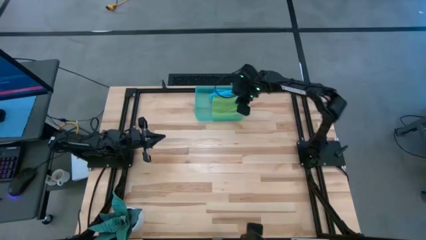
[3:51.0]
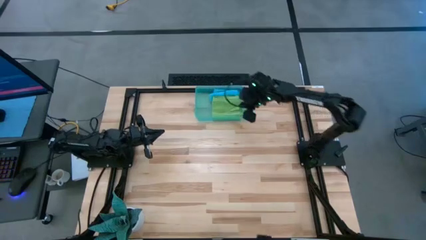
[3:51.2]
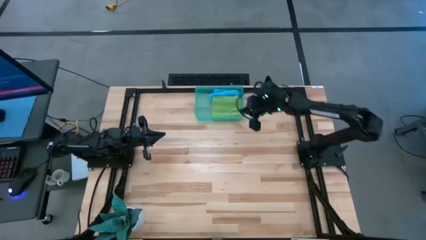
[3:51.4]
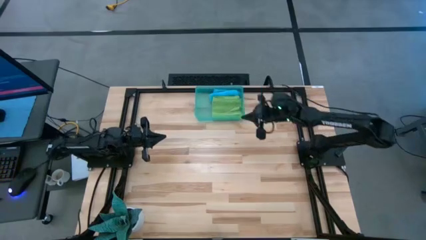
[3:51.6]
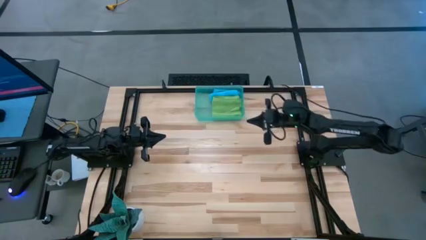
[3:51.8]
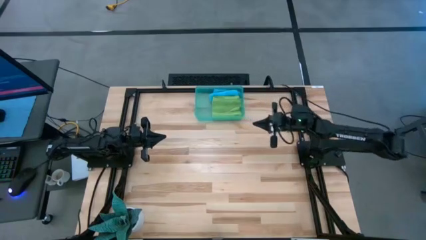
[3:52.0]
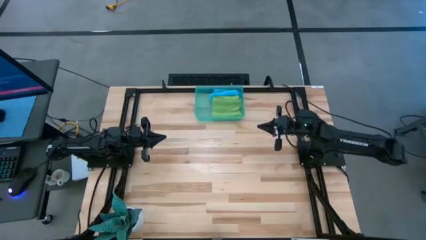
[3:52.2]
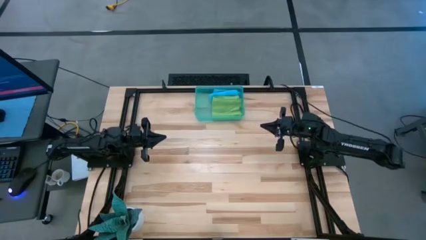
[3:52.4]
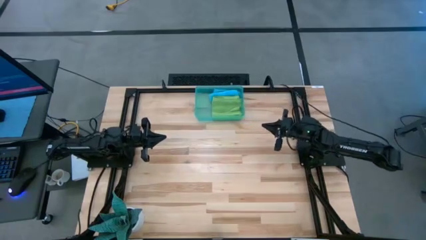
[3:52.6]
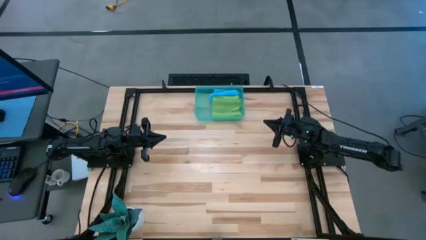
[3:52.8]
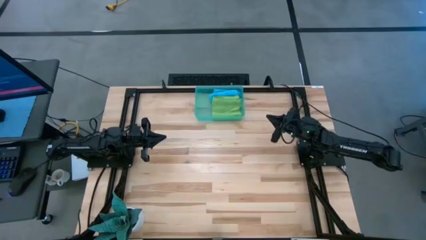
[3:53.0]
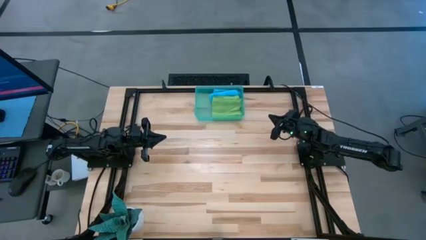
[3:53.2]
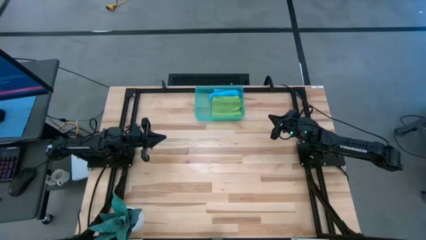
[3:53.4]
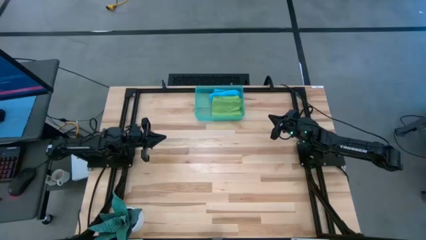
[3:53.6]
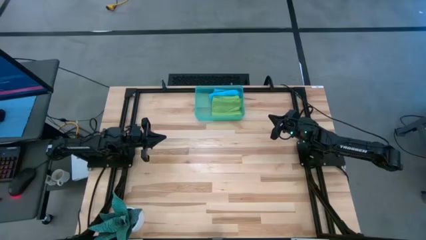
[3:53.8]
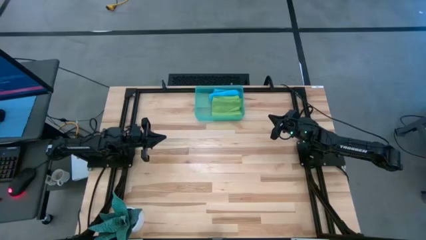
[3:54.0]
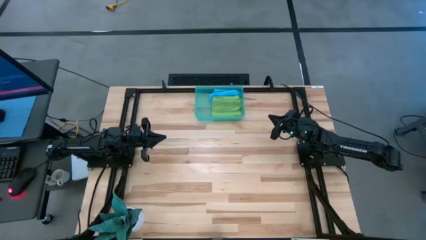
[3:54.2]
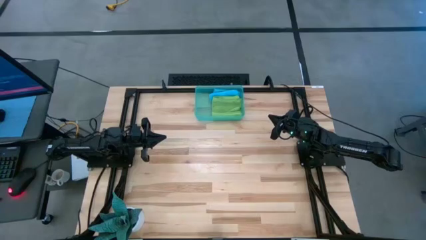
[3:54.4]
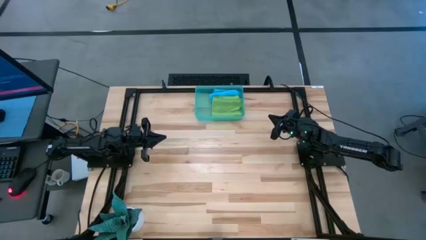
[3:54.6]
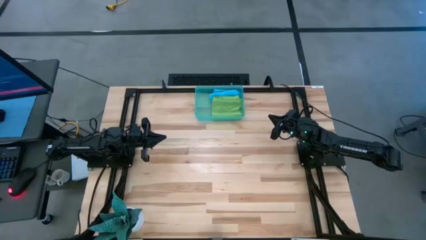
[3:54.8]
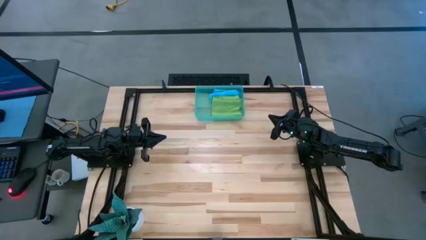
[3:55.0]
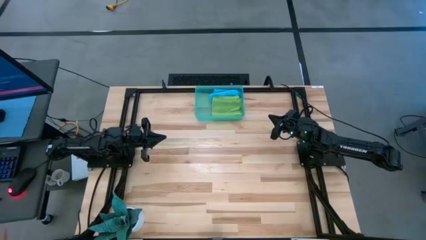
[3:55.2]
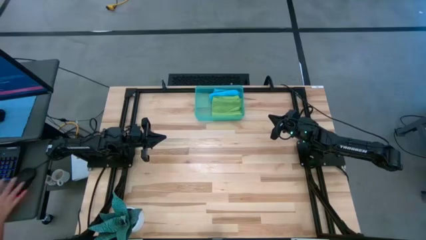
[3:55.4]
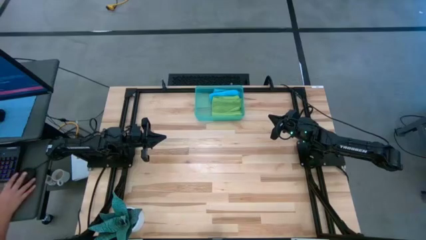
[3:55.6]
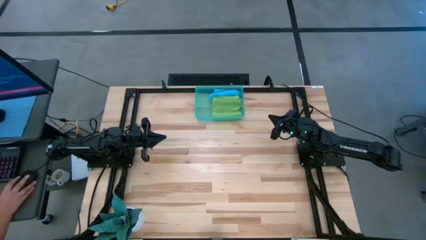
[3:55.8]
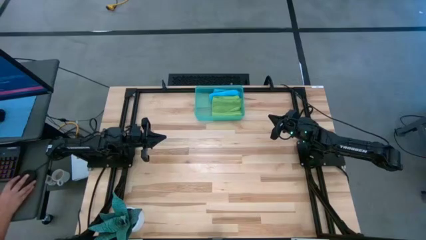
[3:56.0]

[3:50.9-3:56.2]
Task: Roll microfiber towels into tight, uniform cylinder then place into a basket
Return to Home Position

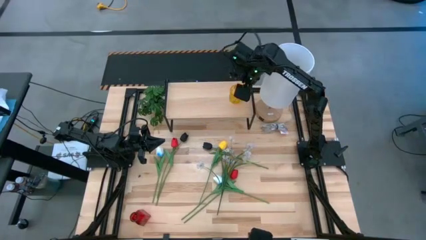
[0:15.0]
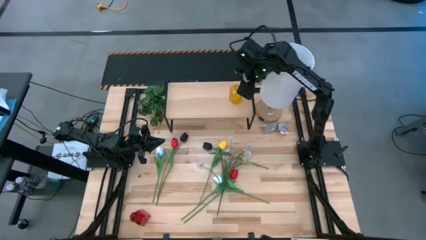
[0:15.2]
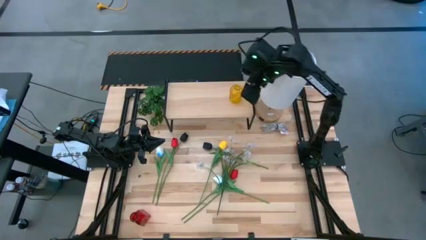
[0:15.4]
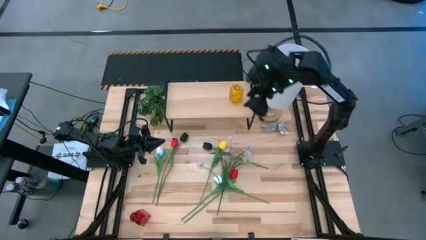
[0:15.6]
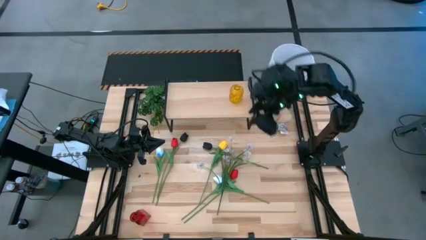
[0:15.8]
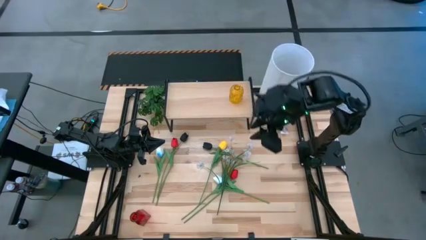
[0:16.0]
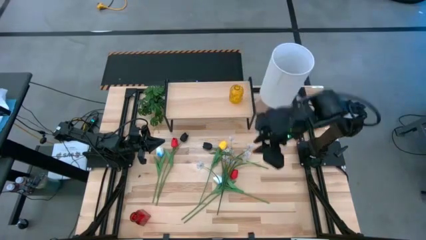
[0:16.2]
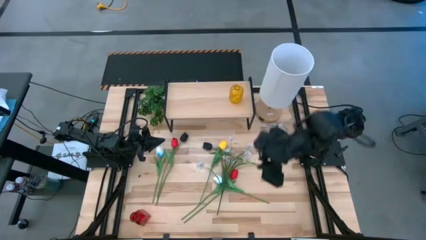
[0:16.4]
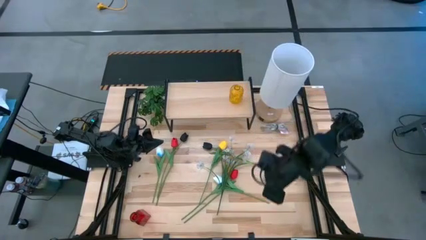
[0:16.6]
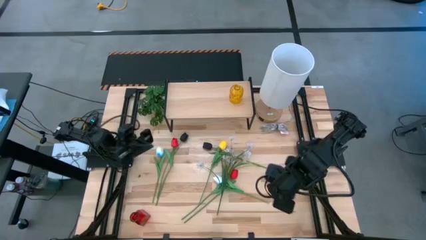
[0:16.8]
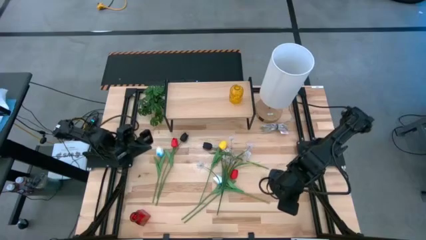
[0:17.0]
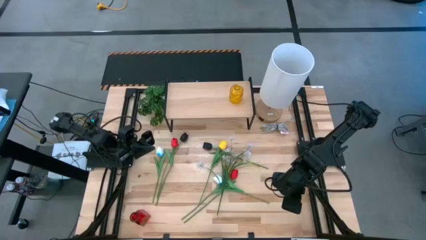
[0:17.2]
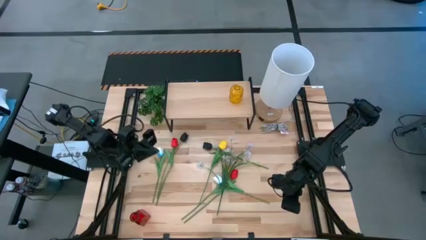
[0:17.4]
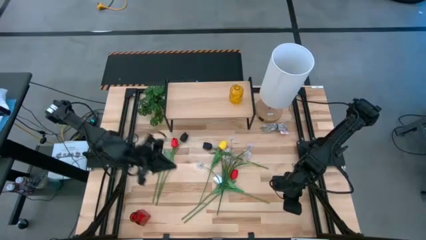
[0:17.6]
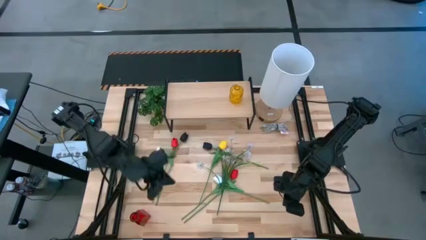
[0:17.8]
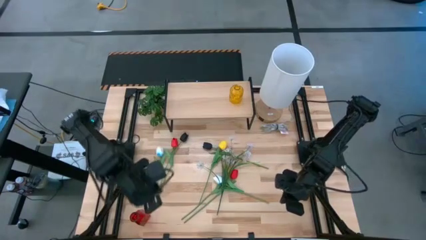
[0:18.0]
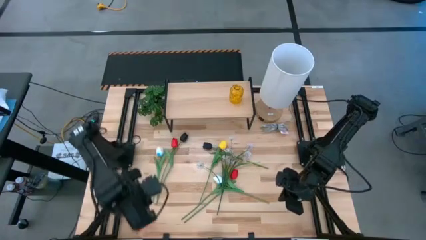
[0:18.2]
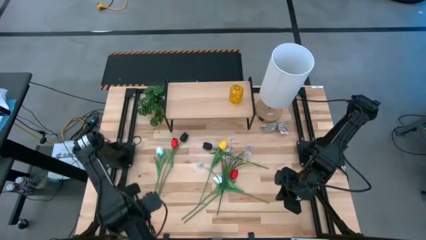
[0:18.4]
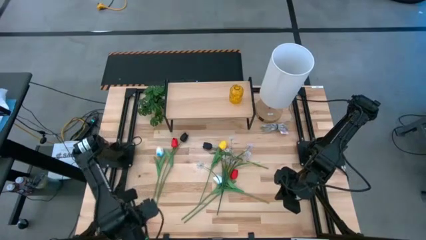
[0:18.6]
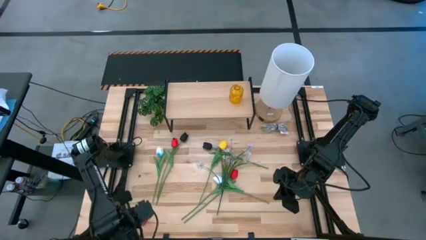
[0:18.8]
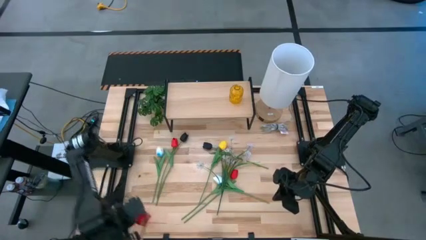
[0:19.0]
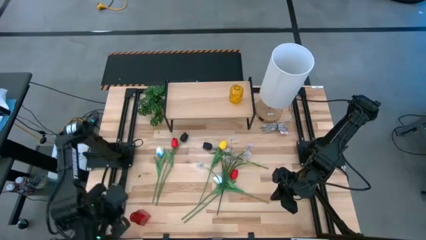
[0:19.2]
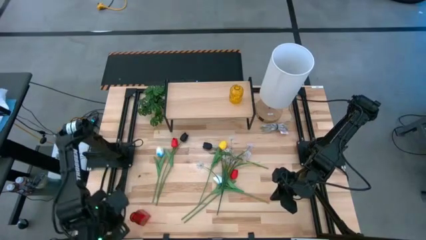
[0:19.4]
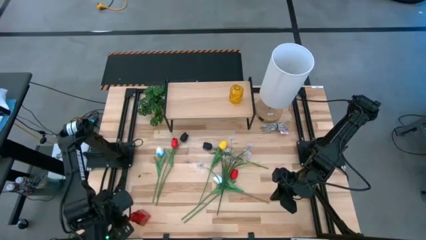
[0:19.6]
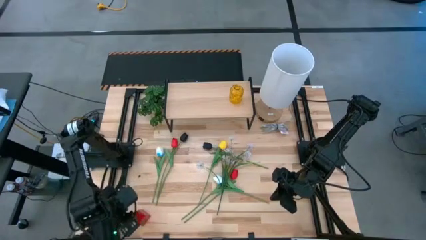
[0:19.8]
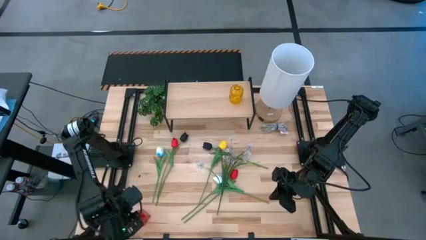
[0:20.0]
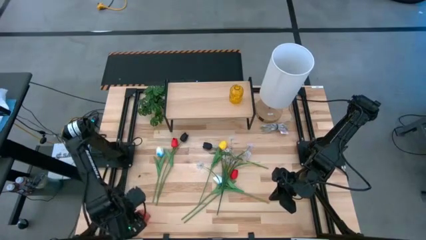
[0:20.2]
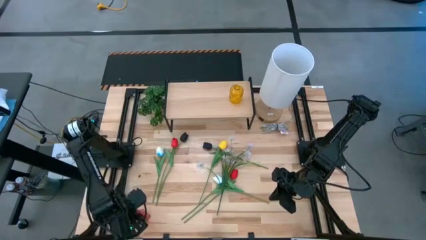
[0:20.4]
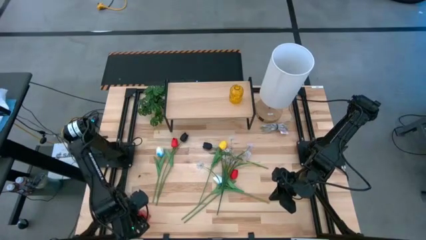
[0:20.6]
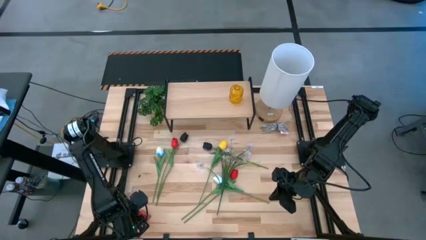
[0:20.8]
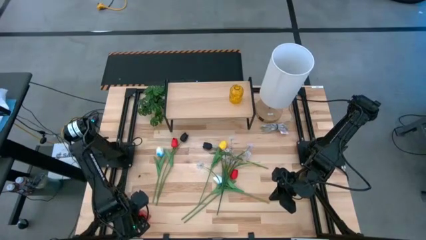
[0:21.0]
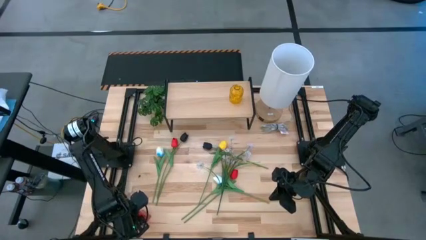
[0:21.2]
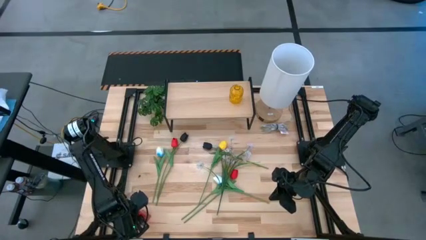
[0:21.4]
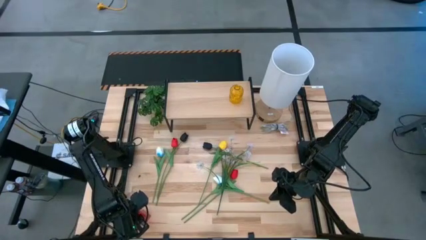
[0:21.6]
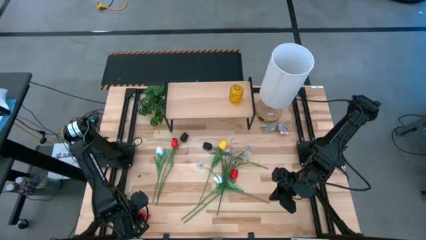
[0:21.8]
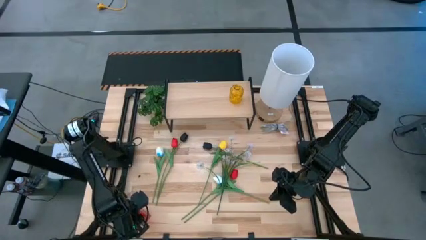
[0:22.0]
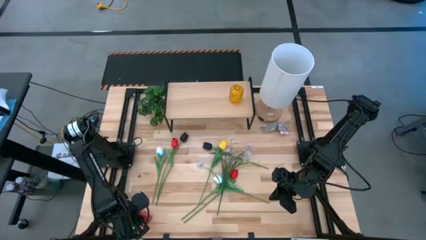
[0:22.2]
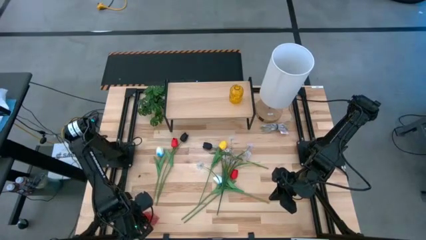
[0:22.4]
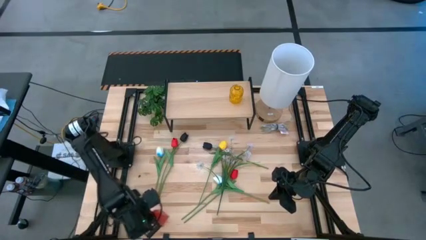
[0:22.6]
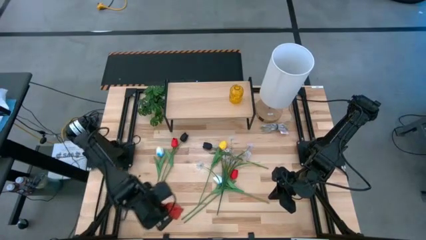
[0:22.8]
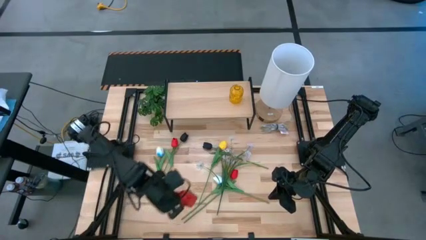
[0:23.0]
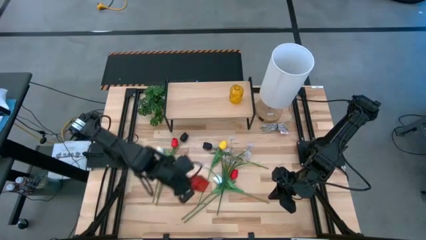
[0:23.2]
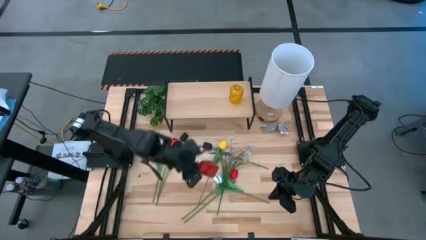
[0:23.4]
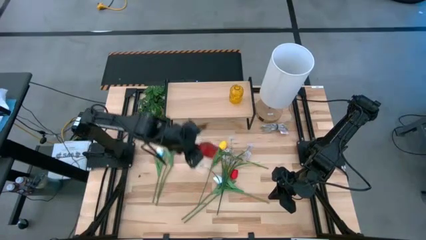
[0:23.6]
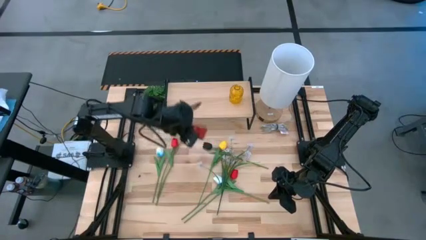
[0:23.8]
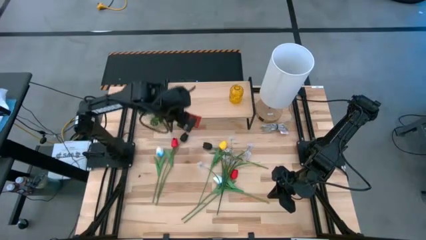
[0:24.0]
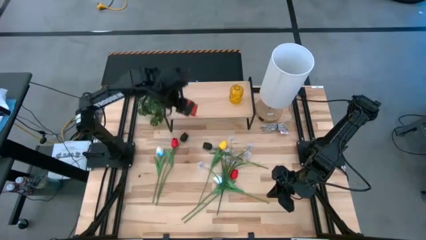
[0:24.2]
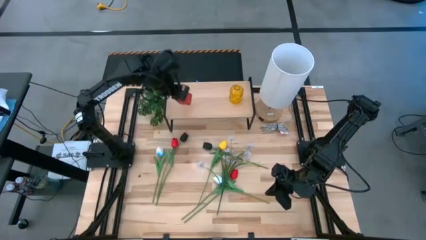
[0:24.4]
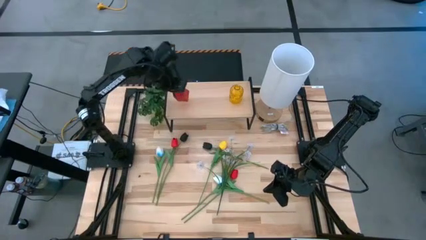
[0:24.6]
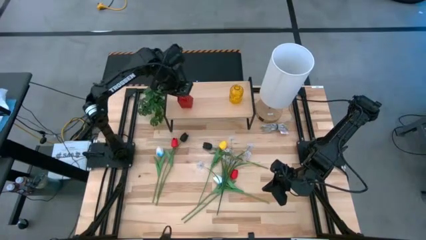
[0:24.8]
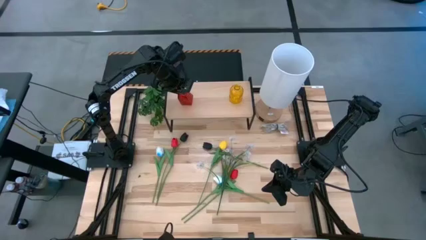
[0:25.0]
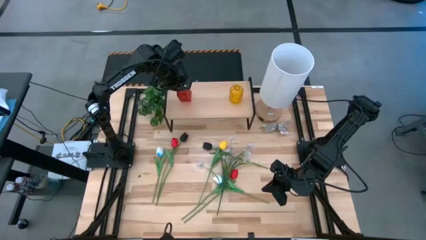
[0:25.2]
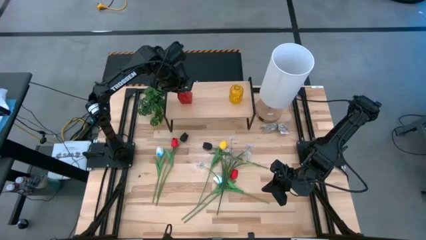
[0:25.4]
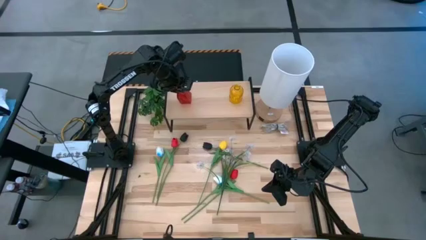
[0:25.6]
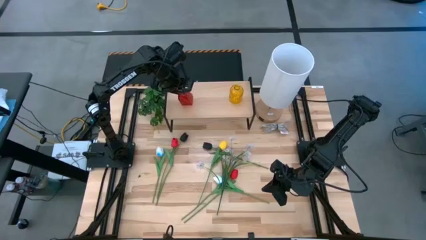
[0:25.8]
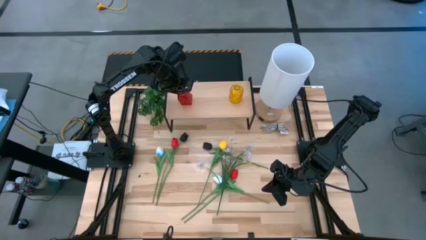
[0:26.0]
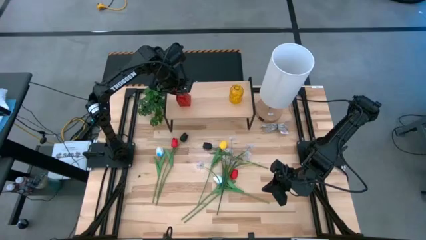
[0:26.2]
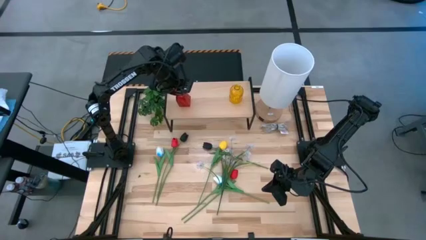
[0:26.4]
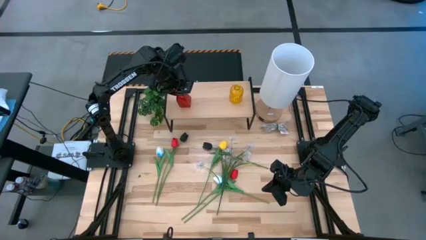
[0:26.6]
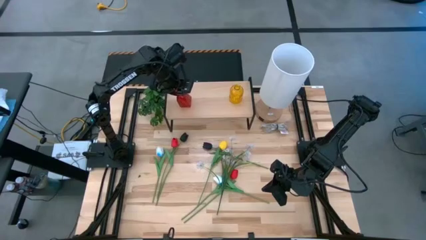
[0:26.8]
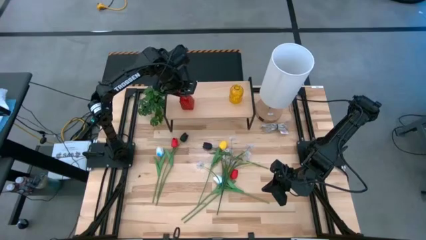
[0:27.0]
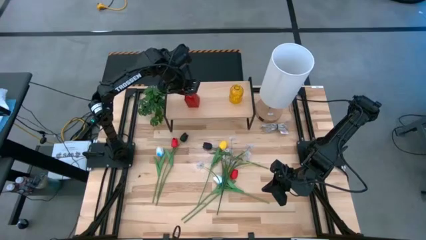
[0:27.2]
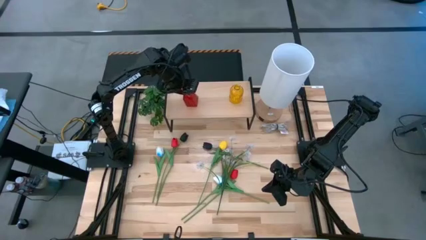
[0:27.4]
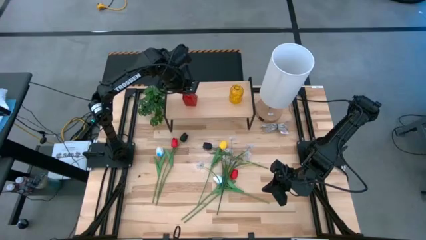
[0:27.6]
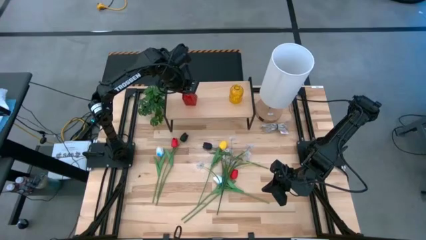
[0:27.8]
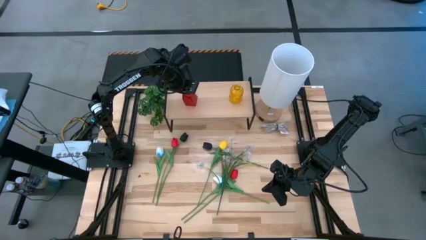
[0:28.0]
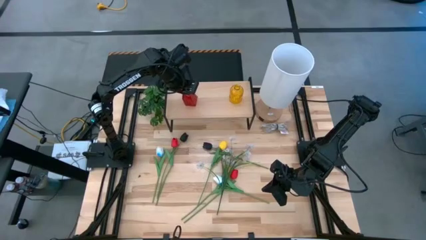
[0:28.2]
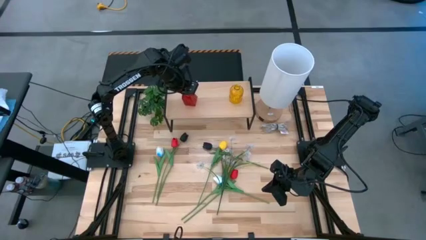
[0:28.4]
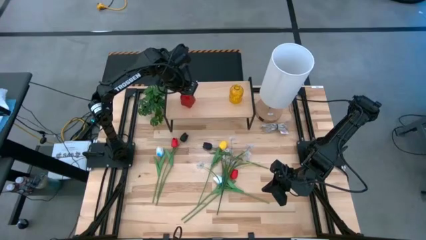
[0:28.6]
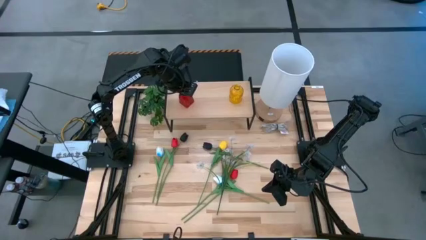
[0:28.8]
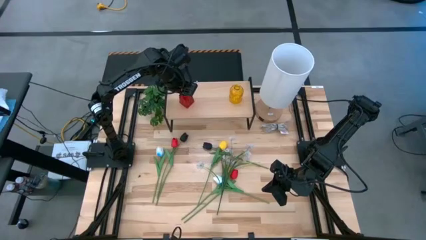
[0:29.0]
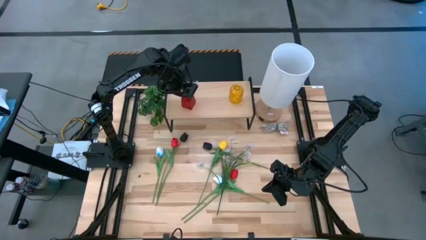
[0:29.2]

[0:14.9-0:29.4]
Task: Pick and place flowers into a vace then onto a shelf
Put the red vase on the shelf
